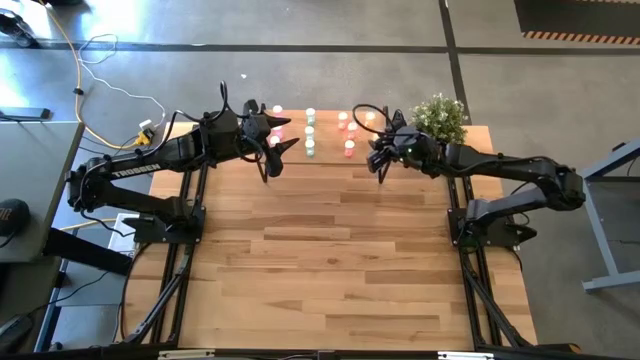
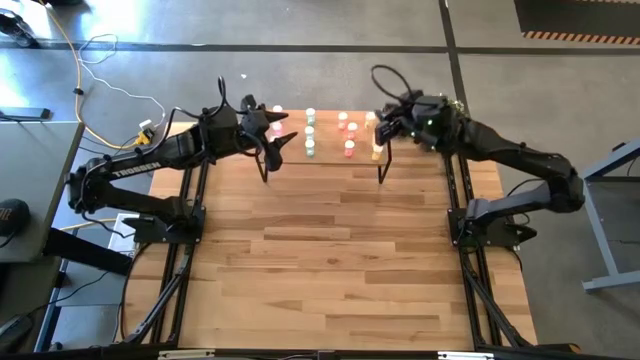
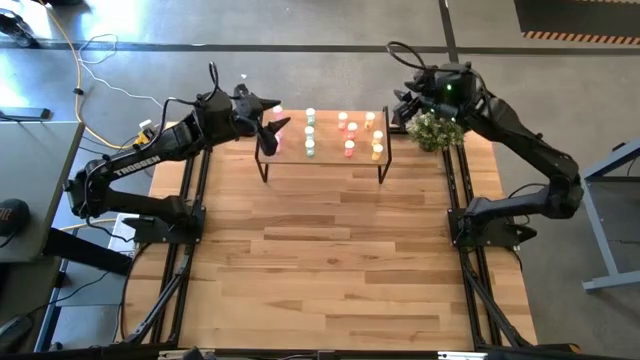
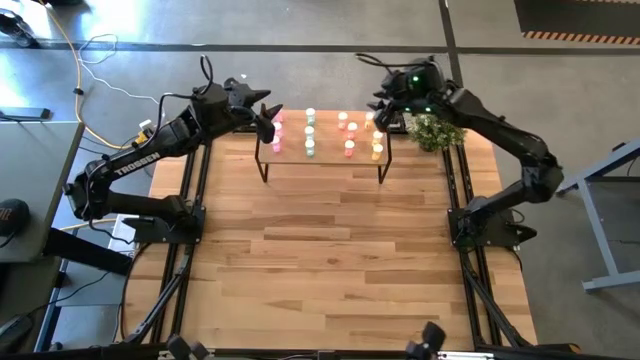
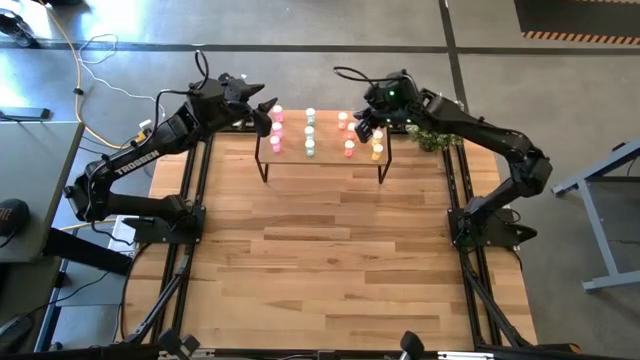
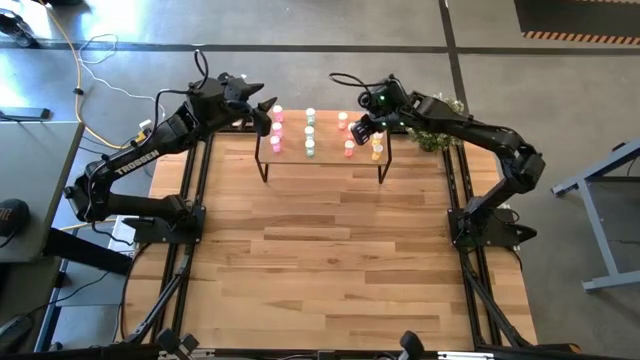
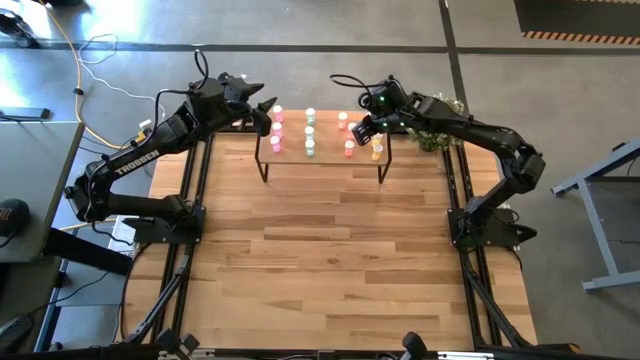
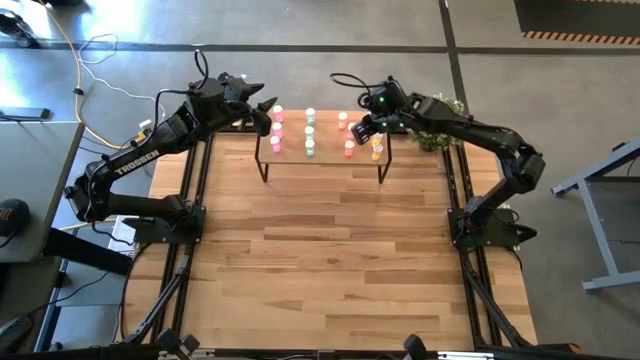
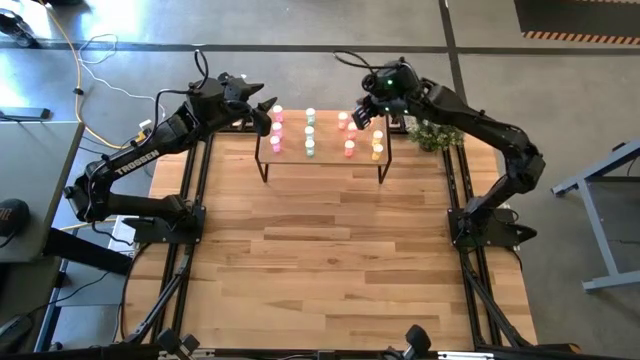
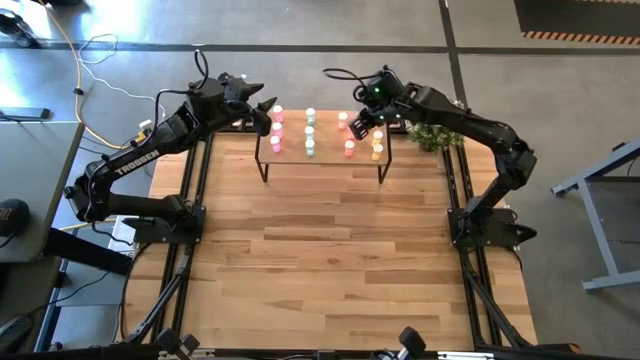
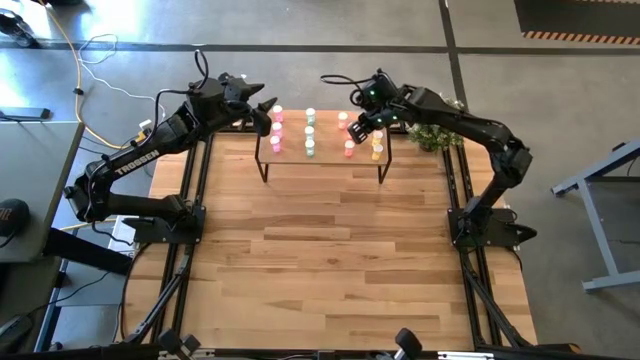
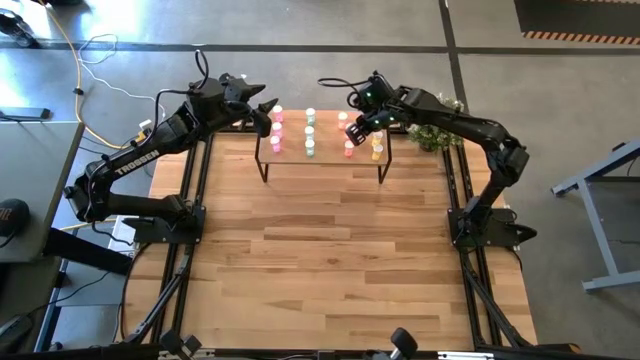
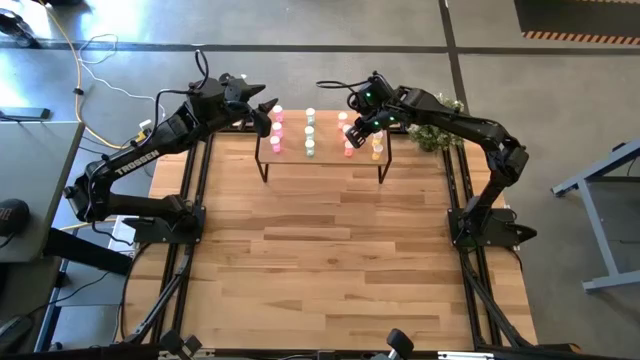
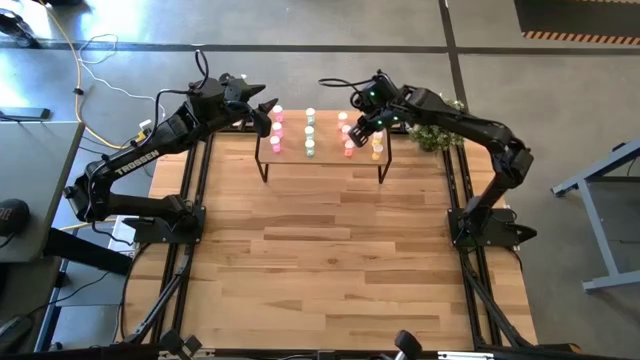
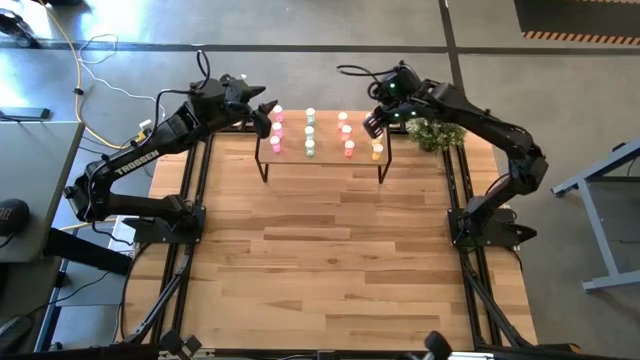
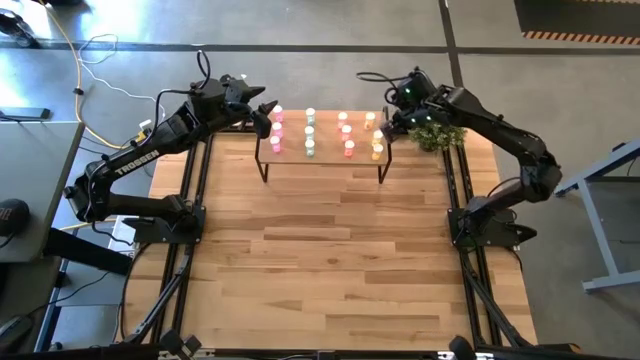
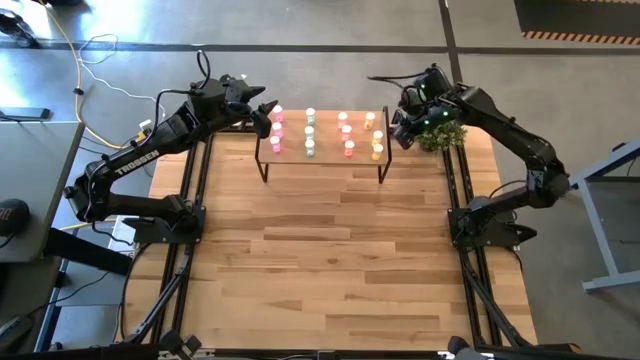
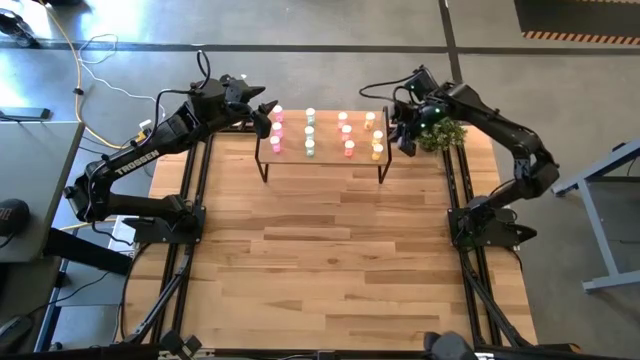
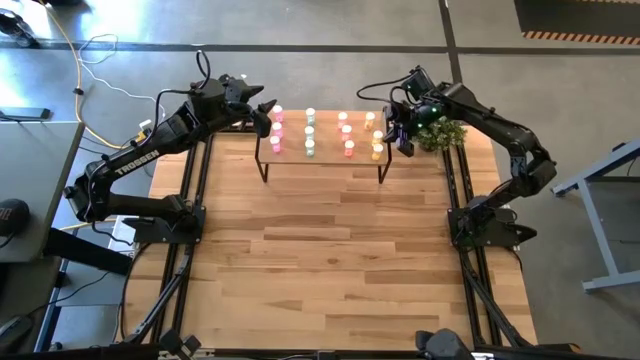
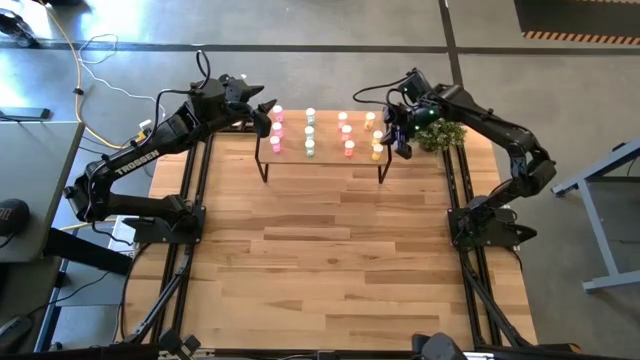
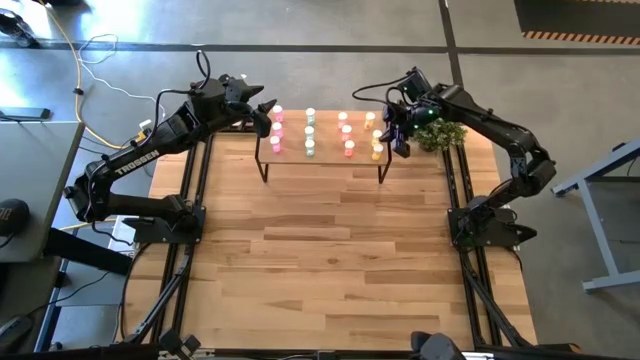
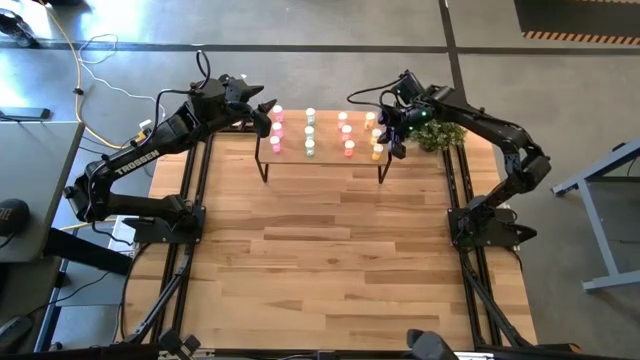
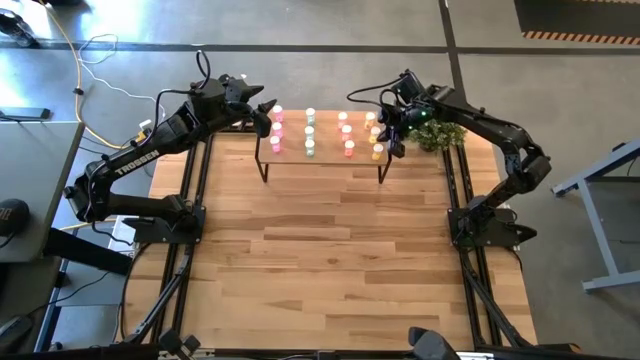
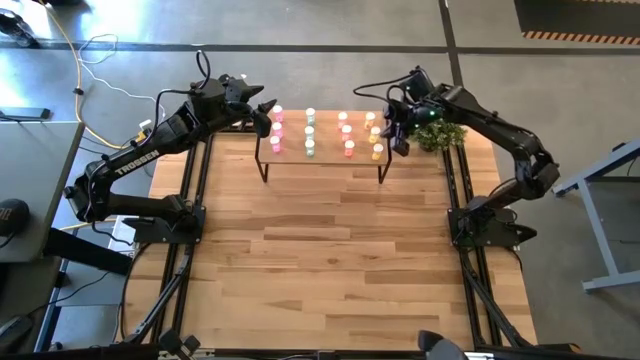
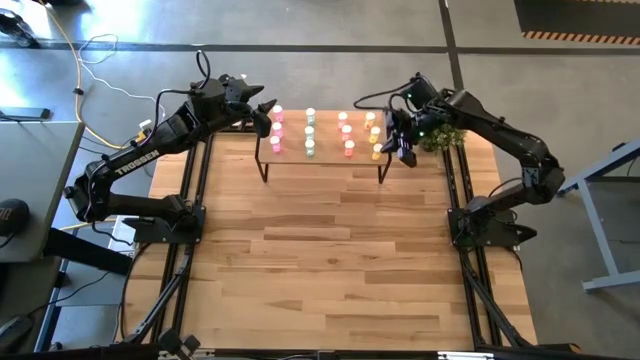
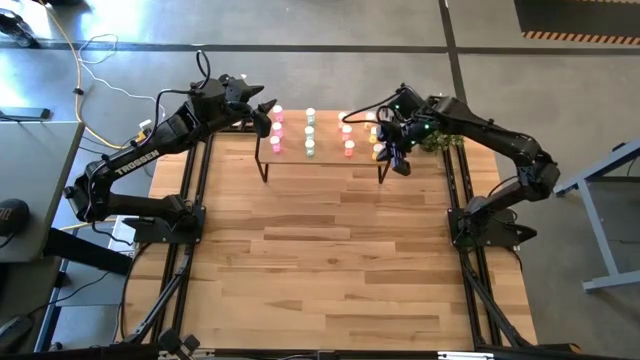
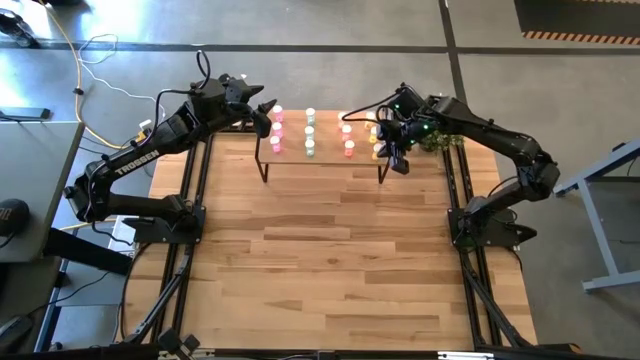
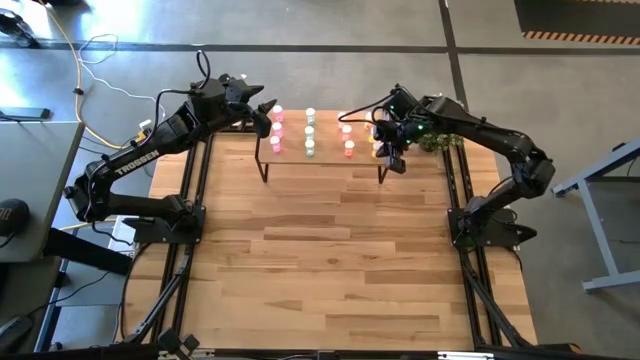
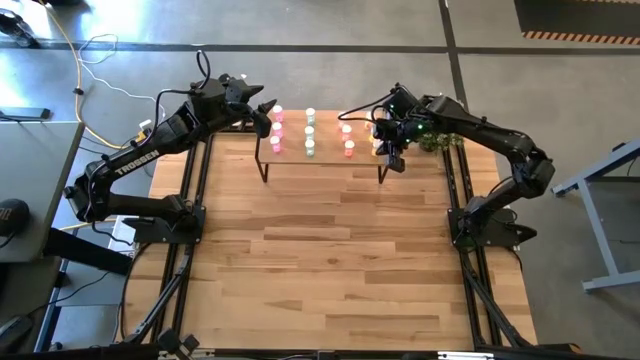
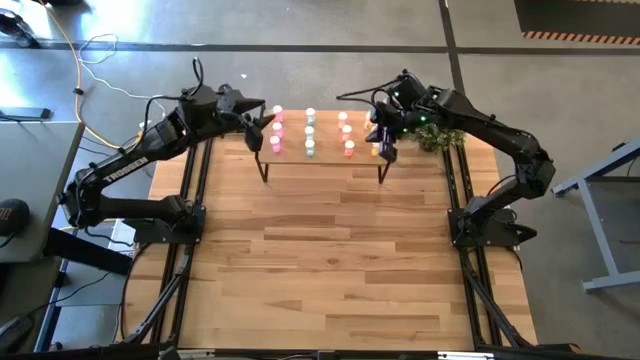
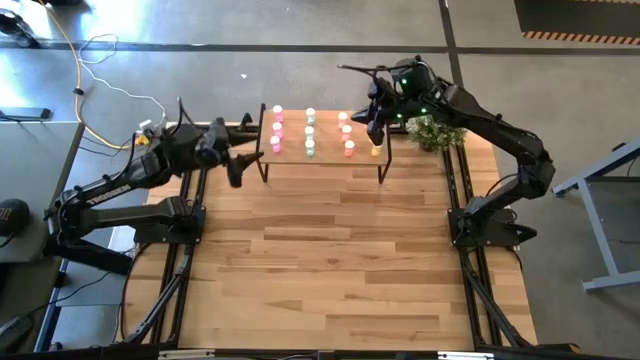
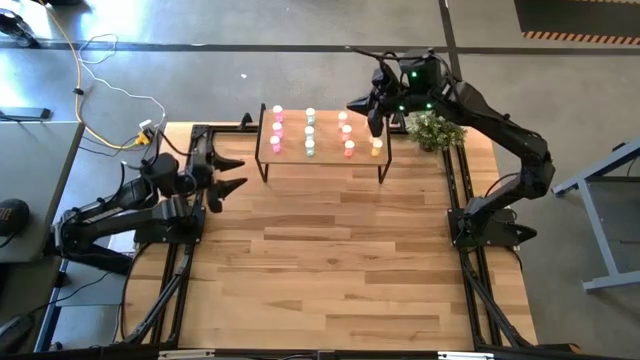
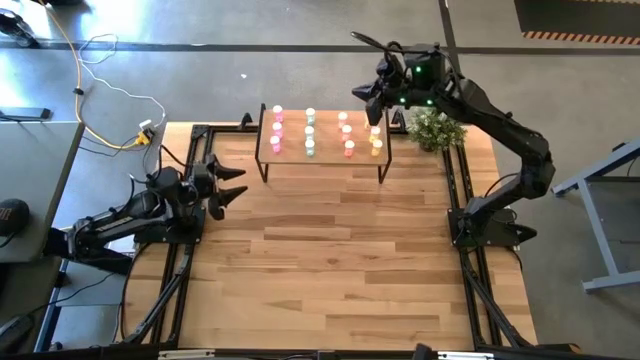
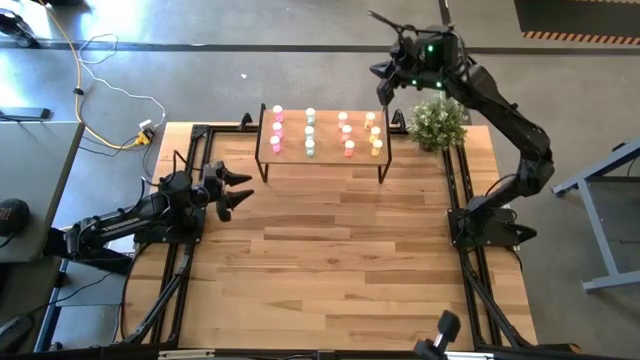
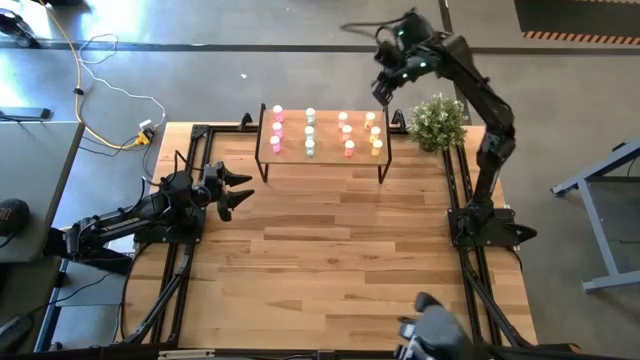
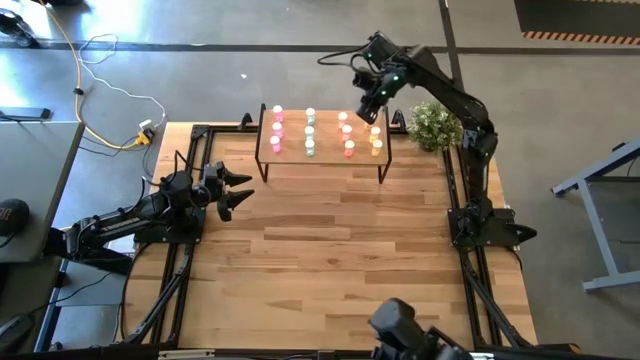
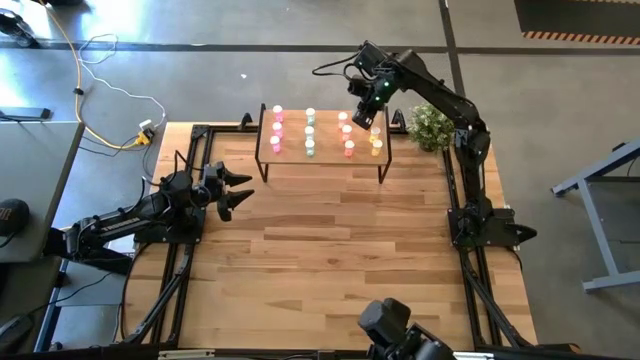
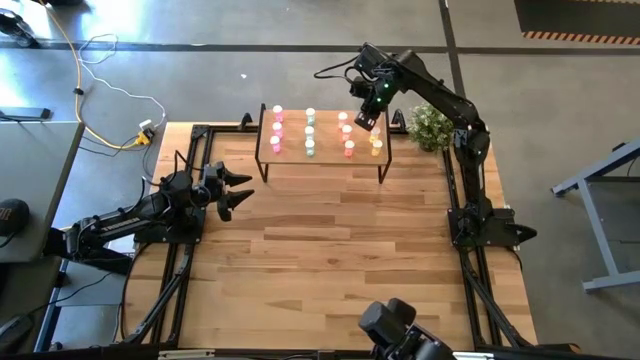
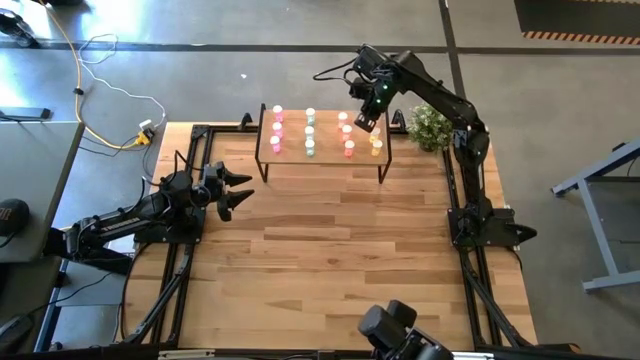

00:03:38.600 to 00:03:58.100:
Task: Pick and place medicine bottles onto shelf by color
Adjust the pill bottles on the shelf
